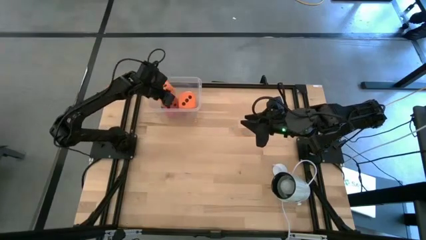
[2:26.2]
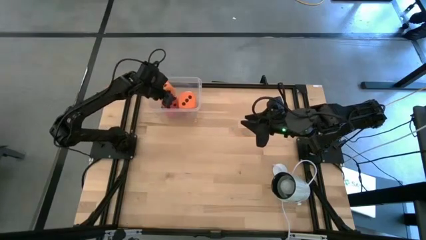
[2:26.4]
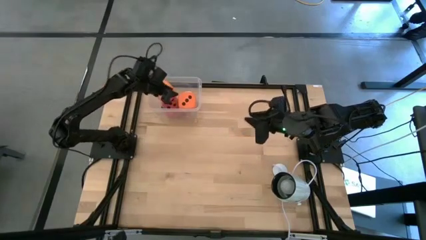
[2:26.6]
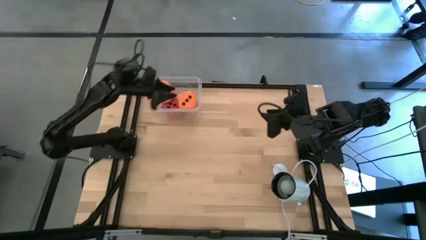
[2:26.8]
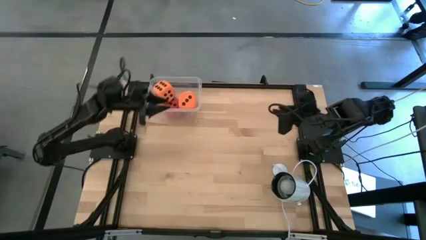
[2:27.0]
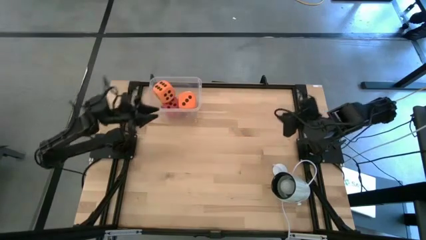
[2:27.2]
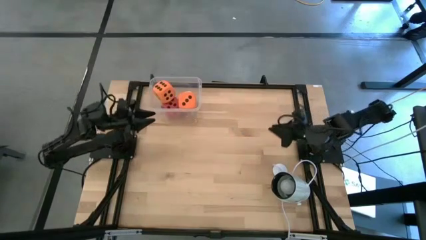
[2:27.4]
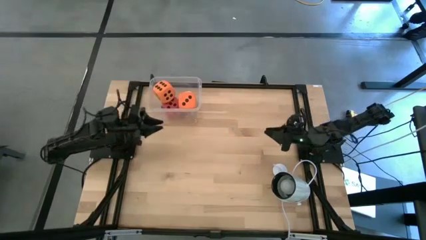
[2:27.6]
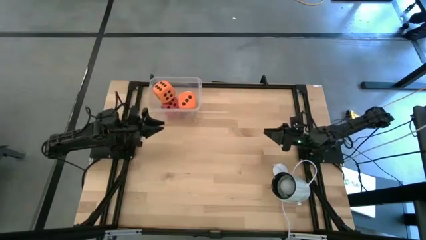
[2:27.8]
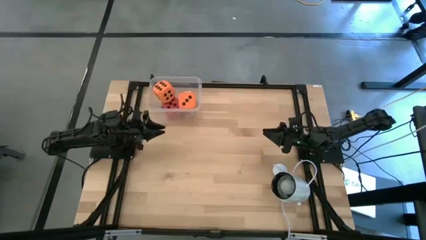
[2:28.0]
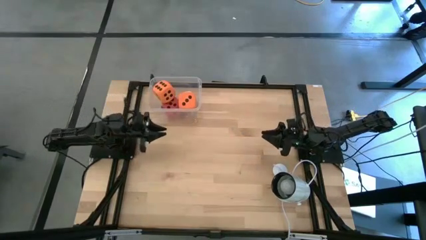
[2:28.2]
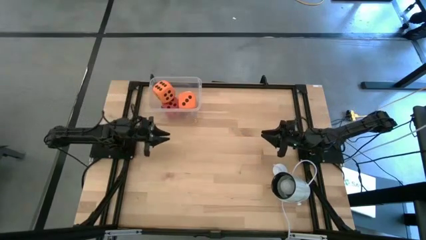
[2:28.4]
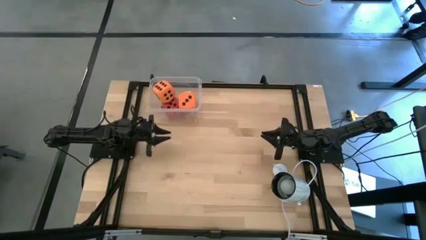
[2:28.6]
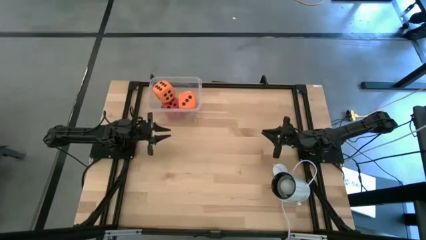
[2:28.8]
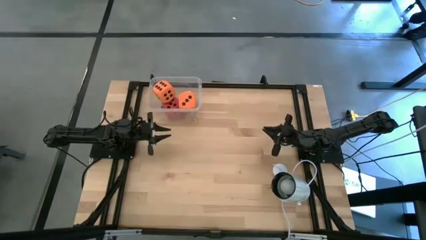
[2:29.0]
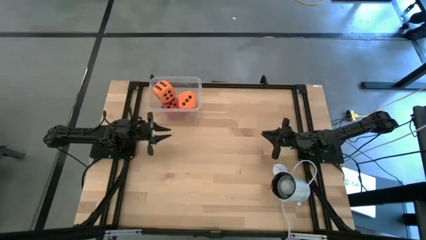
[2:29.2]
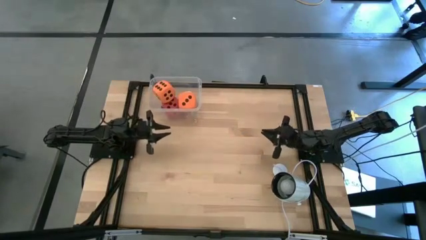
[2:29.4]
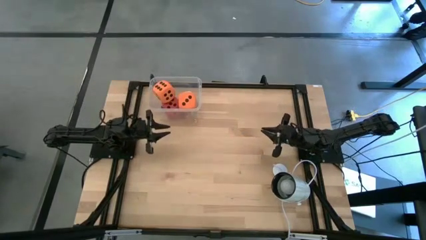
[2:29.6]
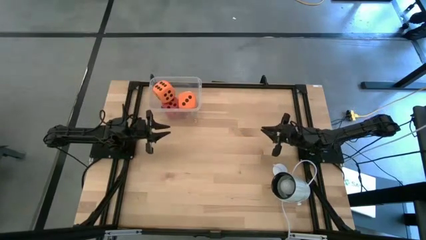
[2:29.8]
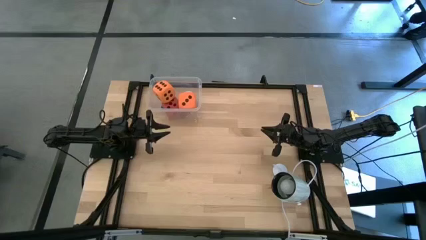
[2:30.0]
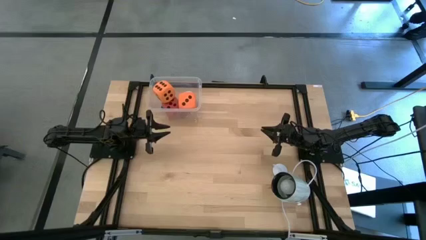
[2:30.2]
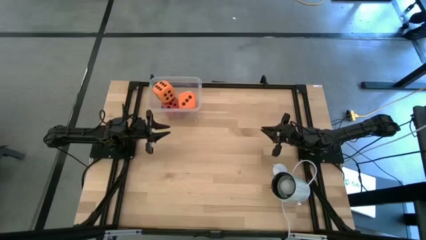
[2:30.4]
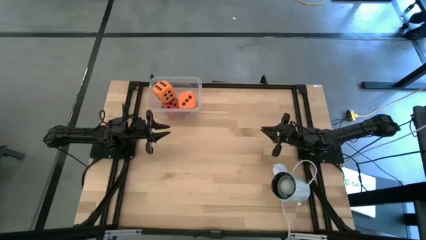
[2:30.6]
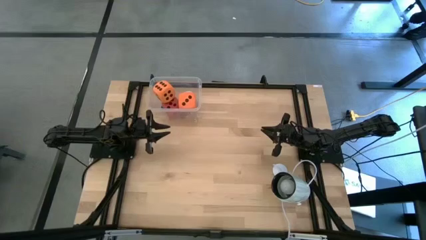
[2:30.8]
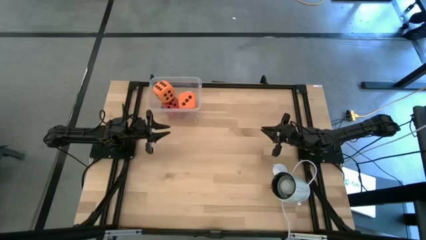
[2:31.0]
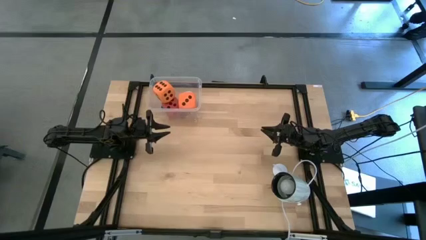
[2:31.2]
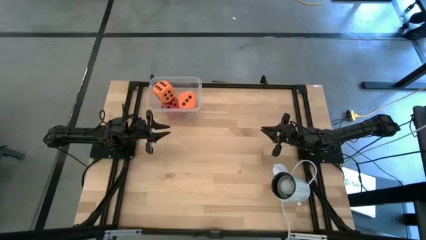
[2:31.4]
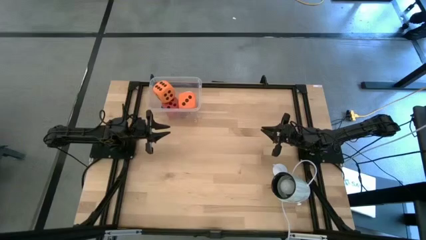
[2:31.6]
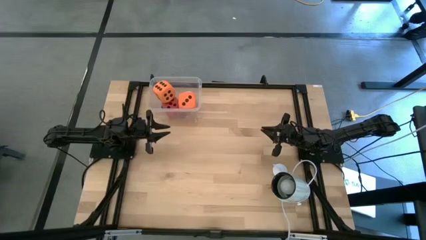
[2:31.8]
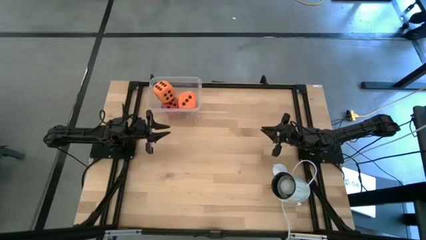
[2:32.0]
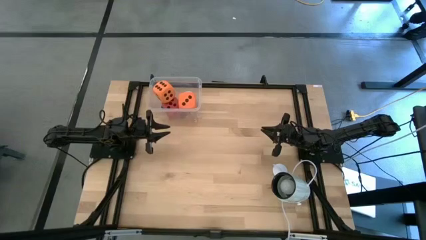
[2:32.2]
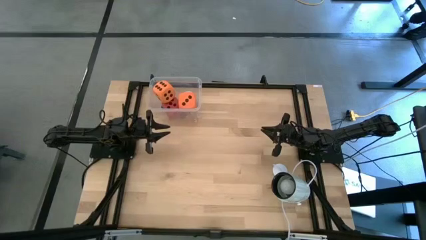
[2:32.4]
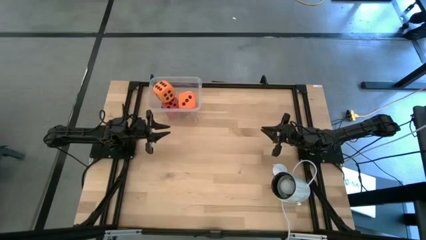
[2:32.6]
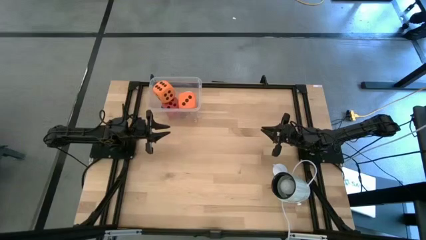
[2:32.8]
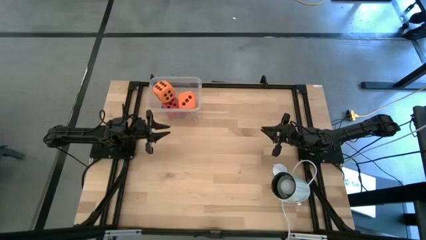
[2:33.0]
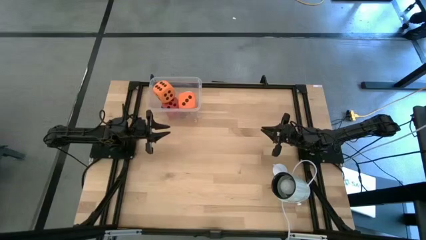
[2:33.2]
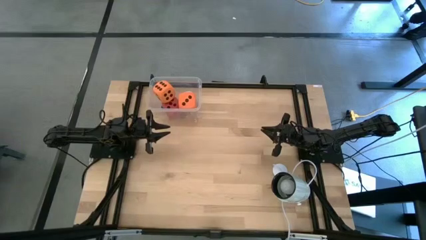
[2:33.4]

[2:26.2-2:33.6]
Task: Pick & Place Dice
Return to Home Position

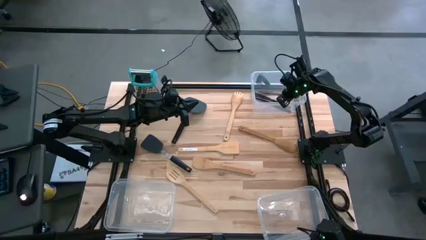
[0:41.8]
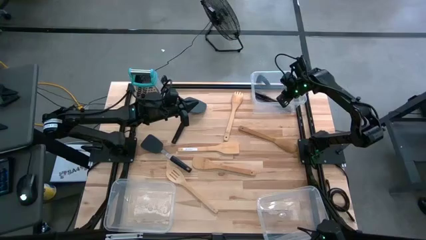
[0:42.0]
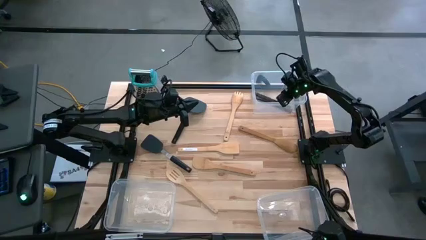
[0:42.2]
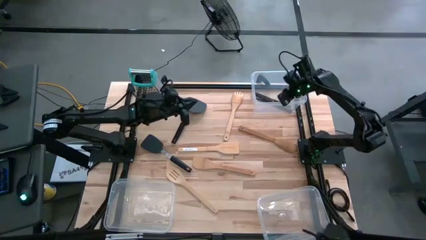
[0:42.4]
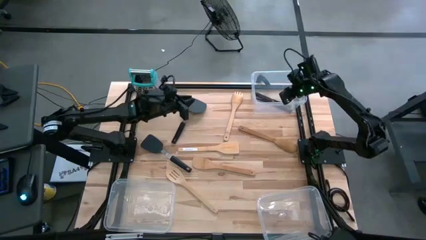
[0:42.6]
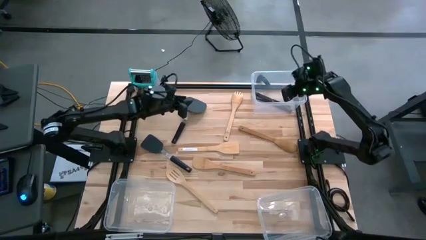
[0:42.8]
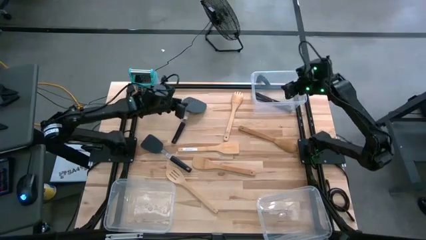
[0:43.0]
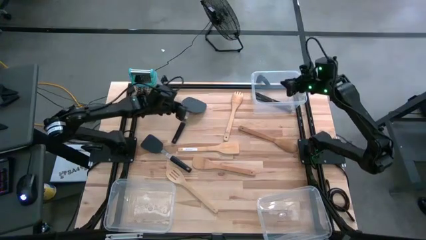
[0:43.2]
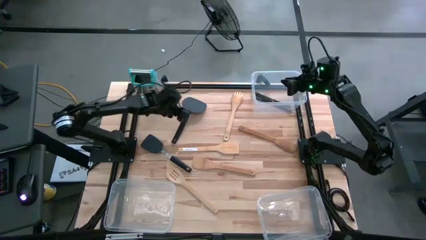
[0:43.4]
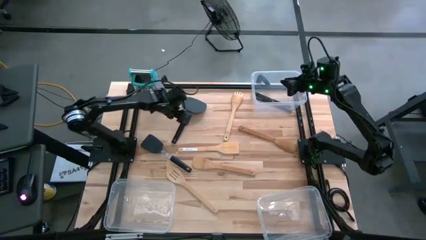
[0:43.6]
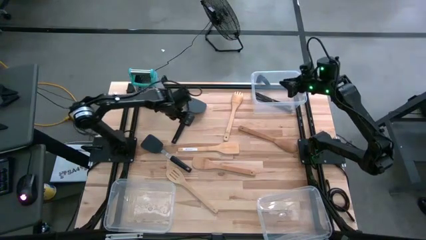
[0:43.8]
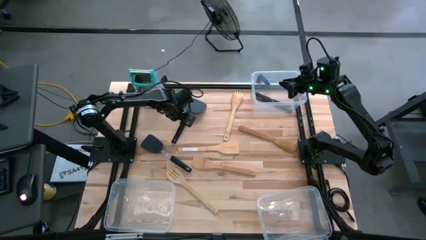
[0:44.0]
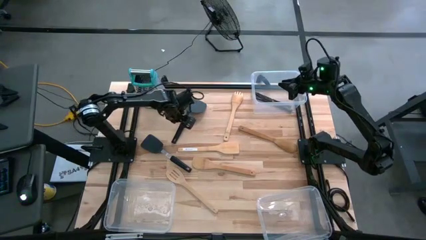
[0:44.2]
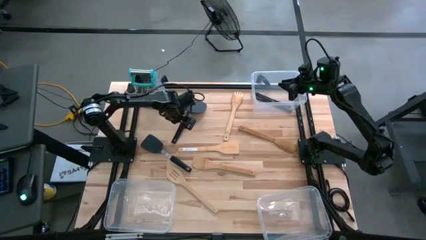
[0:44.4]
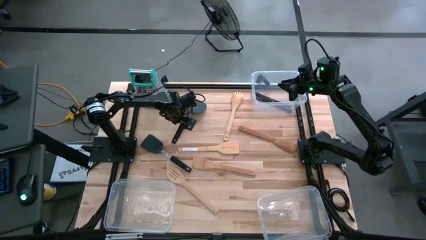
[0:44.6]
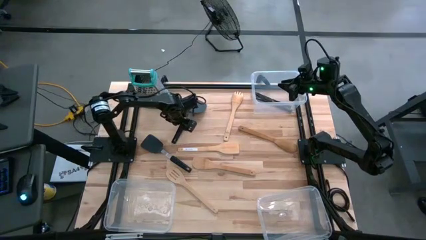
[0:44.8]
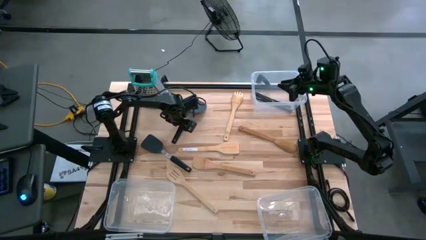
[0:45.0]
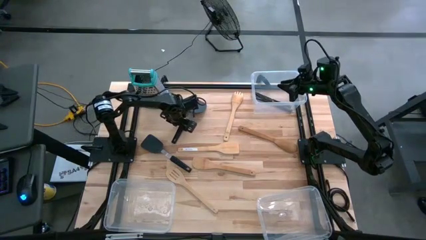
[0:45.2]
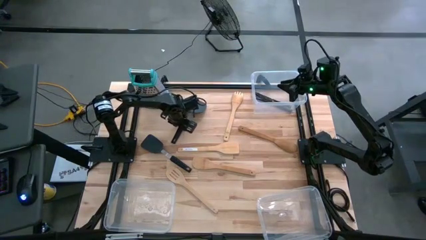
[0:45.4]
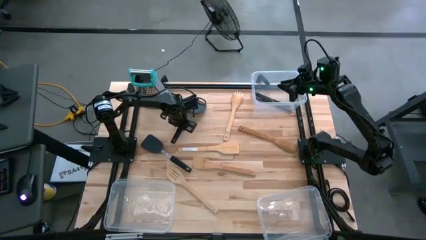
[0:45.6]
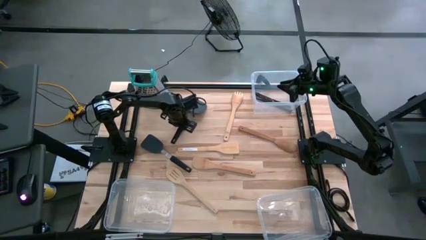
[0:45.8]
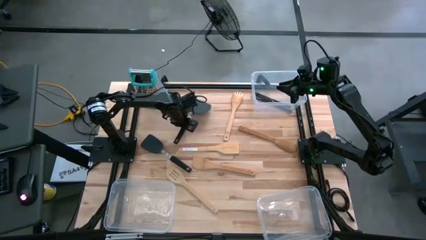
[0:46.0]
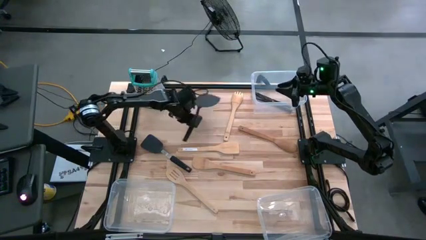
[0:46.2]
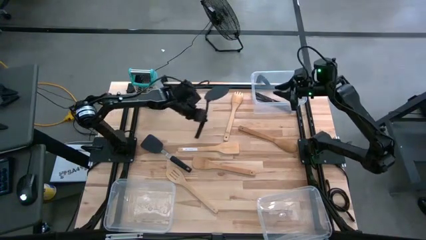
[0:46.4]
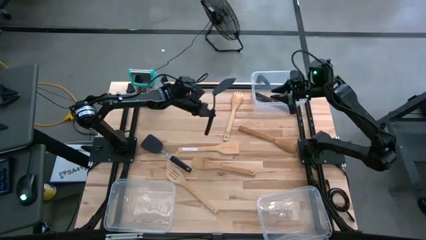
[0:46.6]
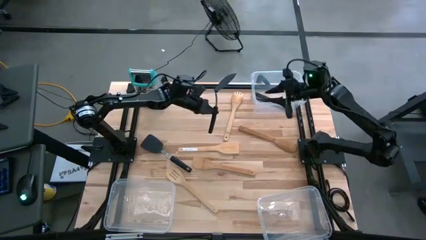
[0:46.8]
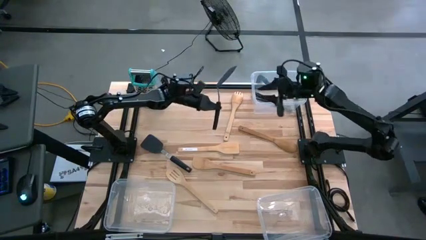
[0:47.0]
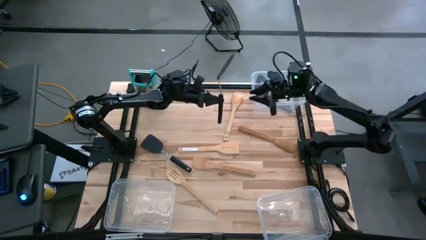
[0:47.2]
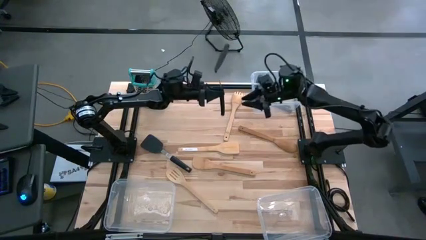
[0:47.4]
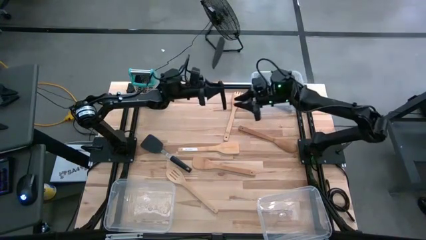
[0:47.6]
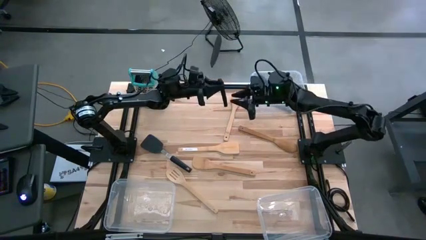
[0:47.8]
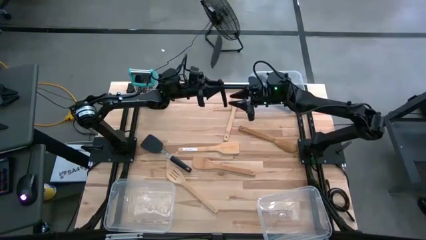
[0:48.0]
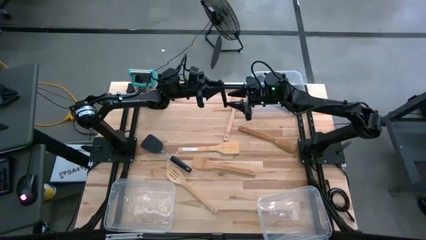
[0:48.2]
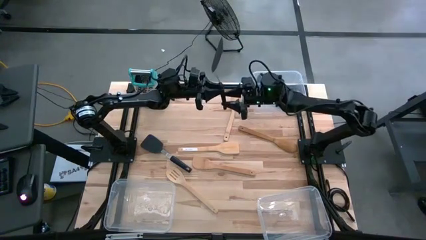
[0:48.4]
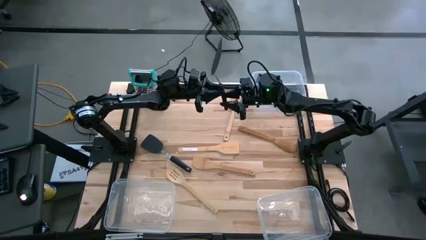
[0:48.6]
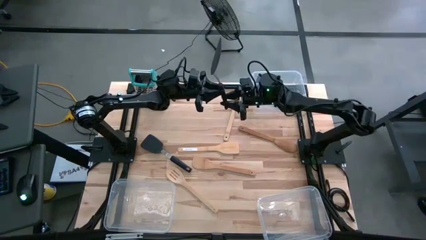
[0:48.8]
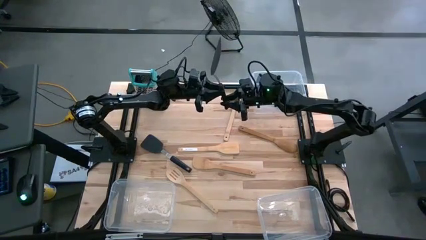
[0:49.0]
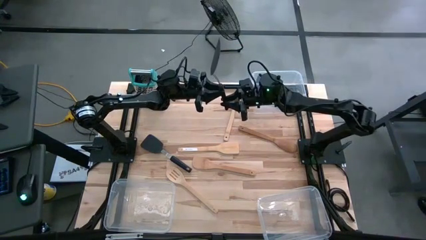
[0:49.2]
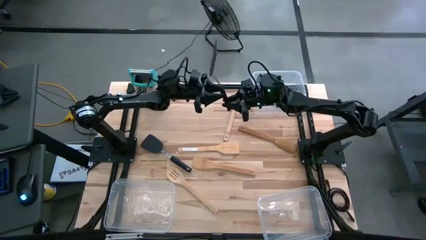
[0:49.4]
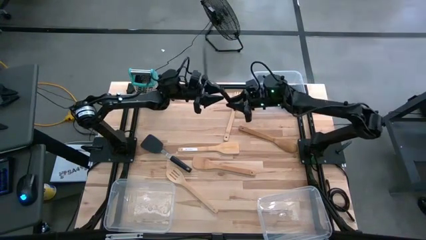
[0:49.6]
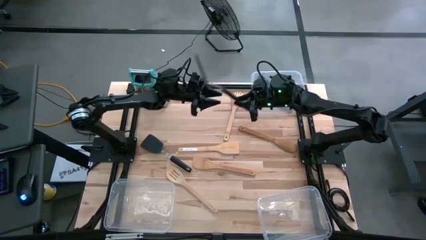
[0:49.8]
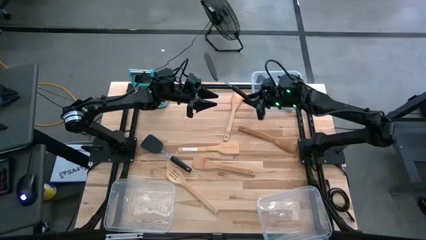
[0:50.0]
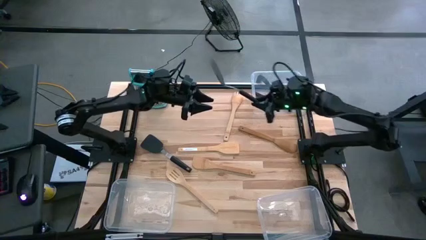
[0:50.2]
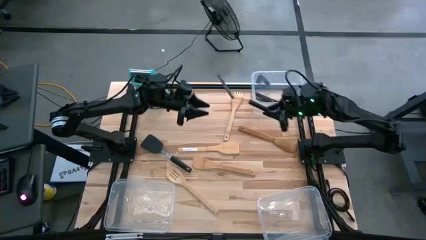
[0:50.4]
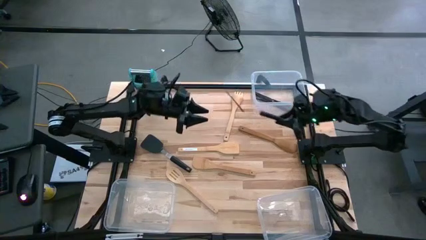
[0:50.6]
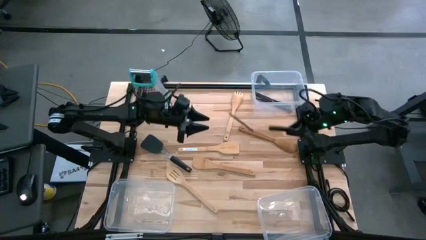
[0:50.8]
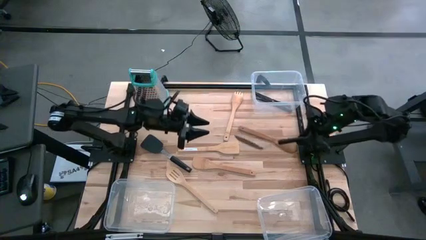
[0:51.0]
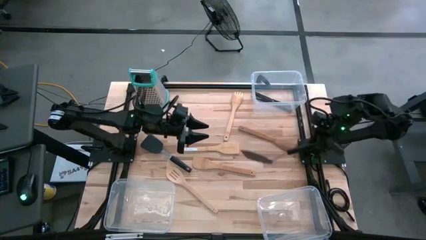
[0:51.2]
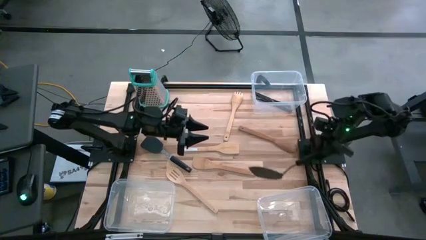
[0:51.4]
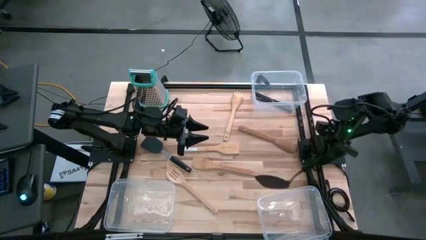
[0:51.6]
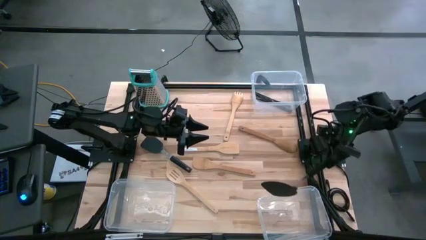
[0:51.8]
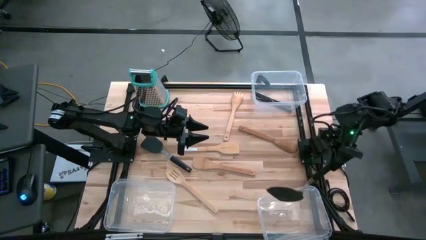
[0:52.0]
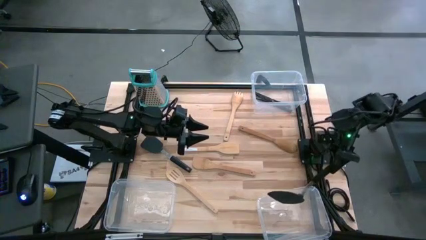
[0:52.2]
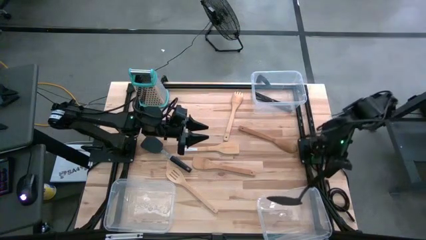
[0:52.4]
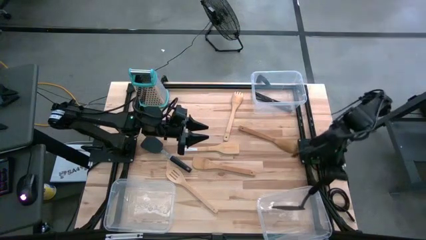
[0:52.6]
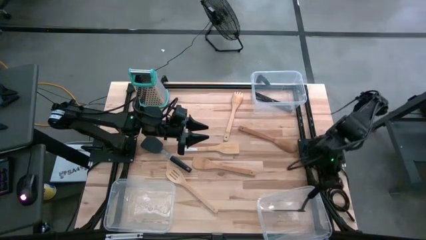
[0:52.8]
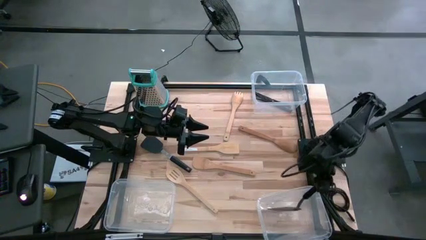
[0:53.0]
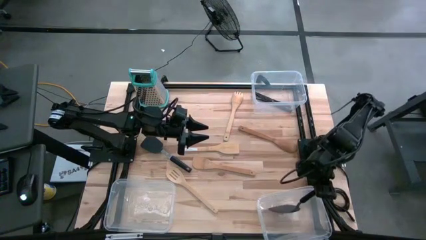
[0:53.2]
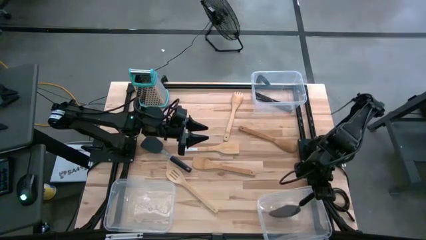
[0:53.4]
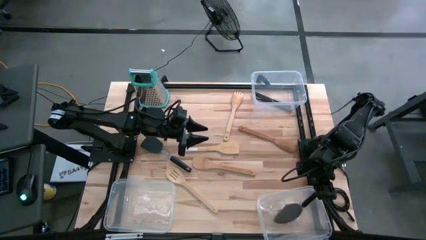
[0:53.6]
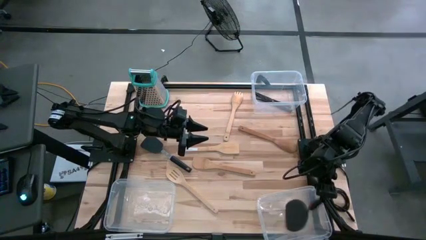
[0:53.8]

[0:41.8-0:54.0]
Task: Pick & Place Kitchen Items
Put the top black spatula into the bottom right transparent bin
